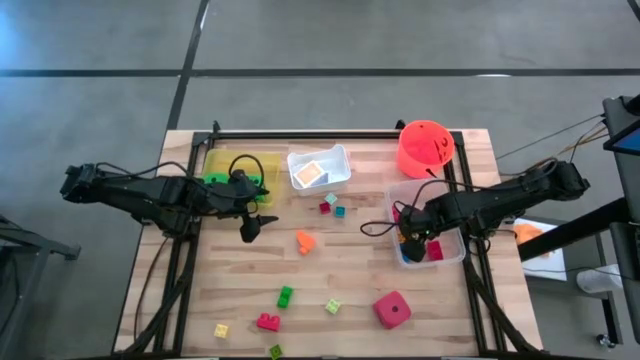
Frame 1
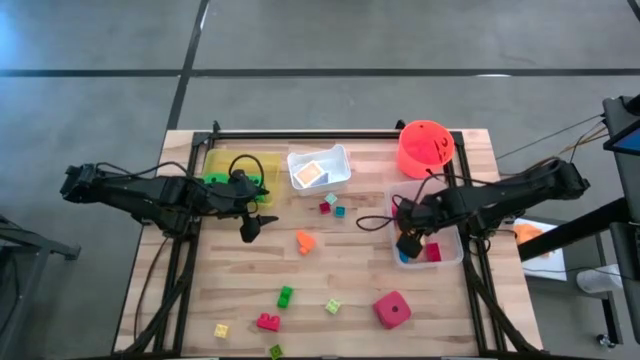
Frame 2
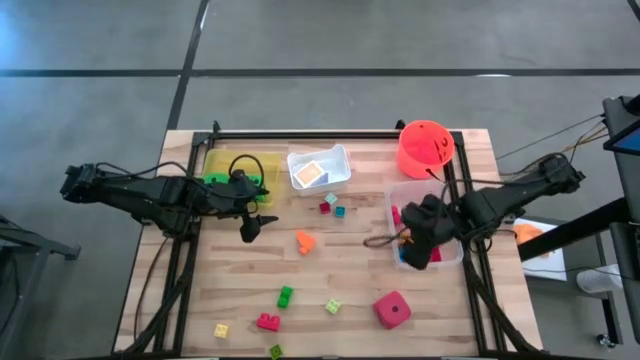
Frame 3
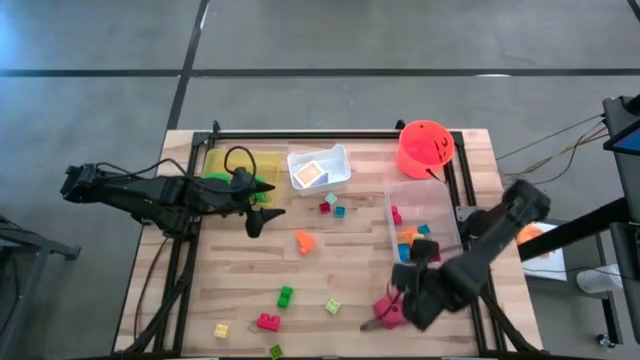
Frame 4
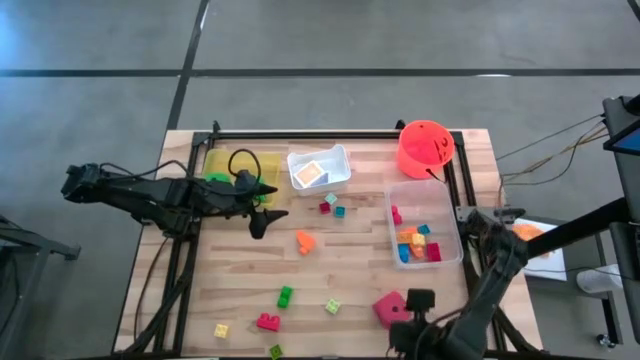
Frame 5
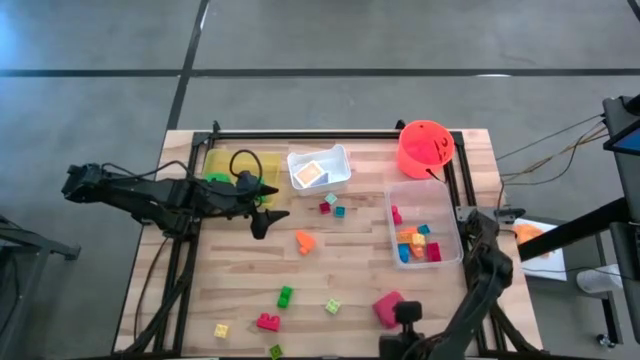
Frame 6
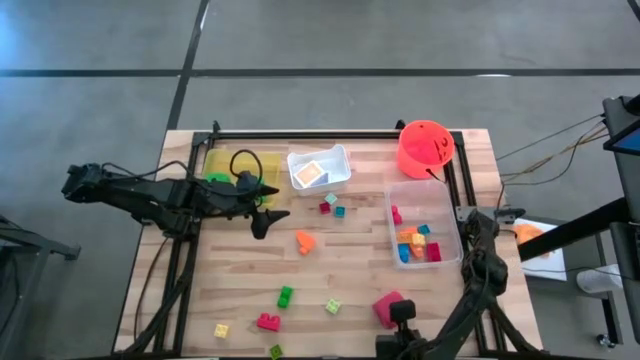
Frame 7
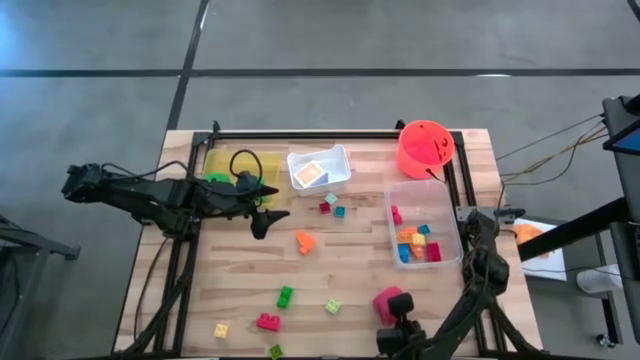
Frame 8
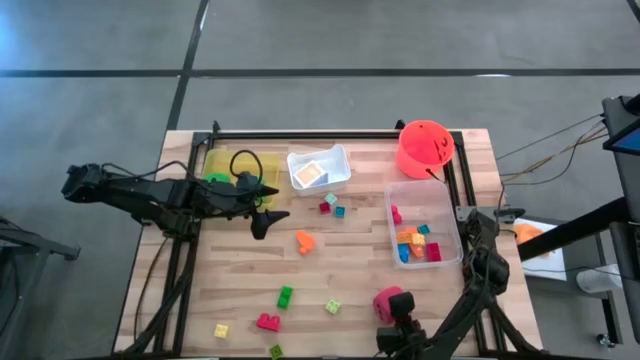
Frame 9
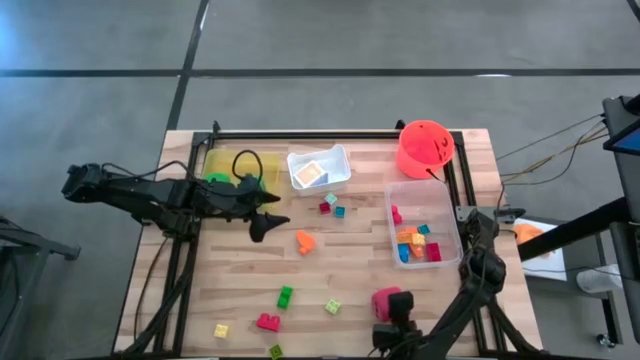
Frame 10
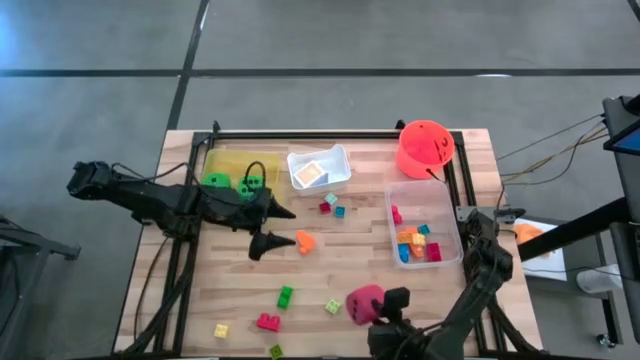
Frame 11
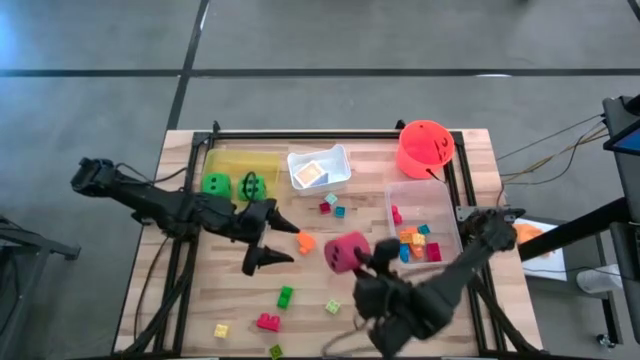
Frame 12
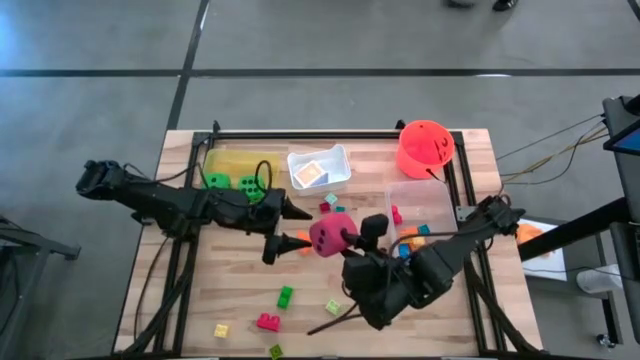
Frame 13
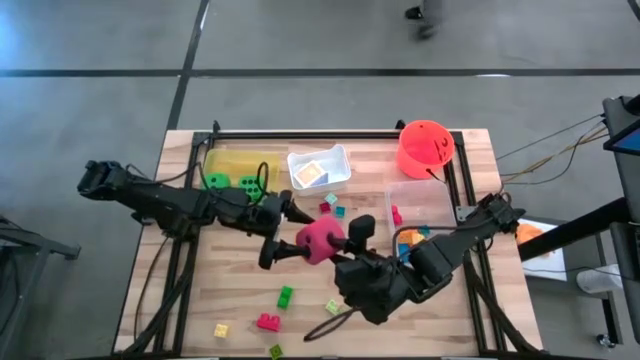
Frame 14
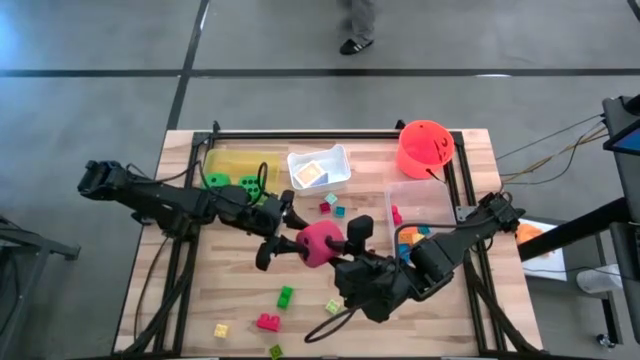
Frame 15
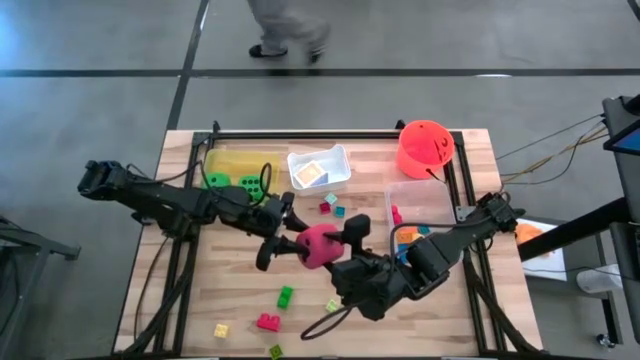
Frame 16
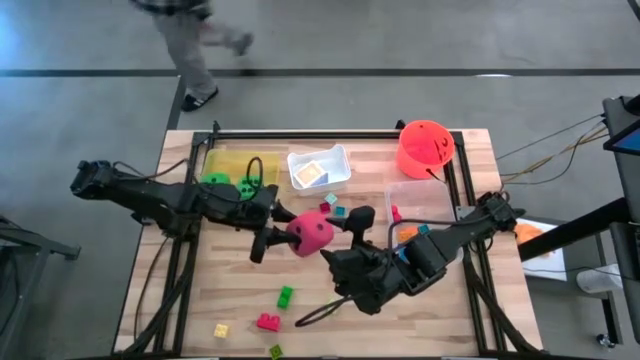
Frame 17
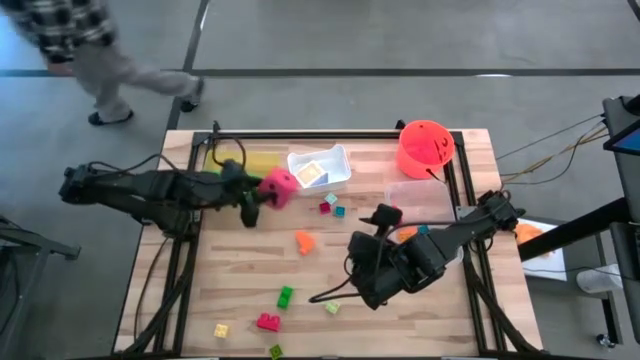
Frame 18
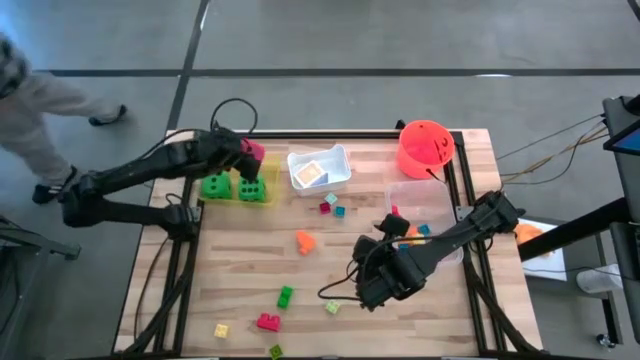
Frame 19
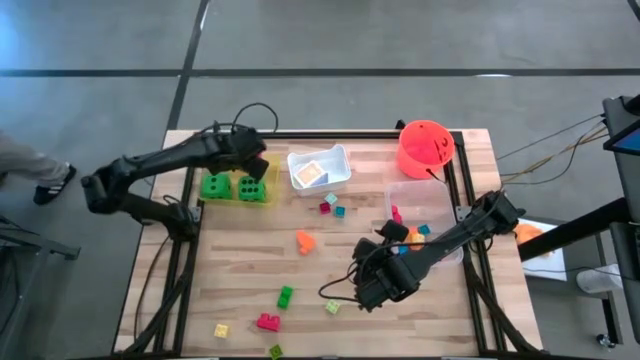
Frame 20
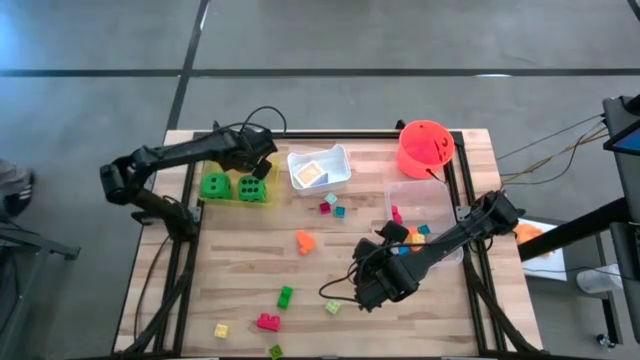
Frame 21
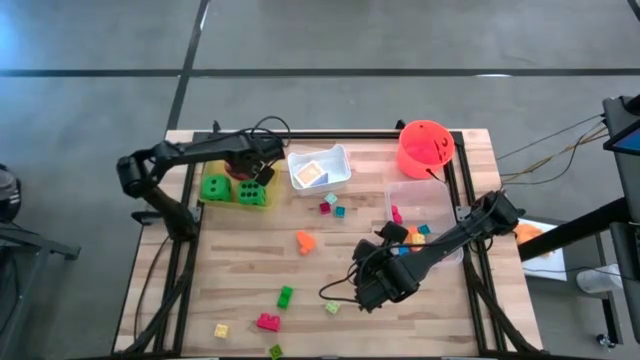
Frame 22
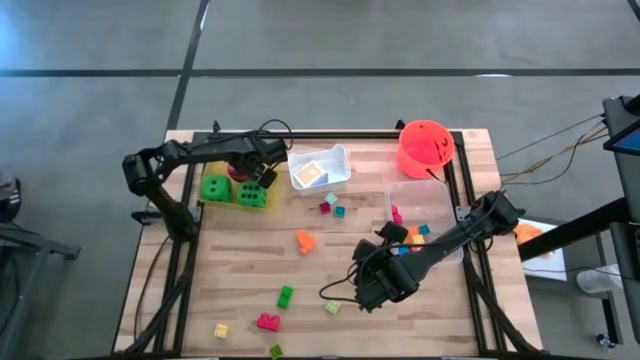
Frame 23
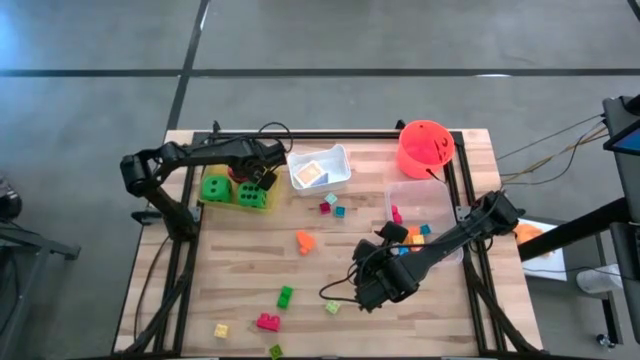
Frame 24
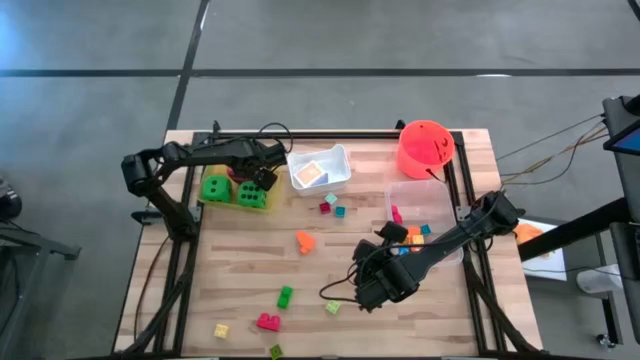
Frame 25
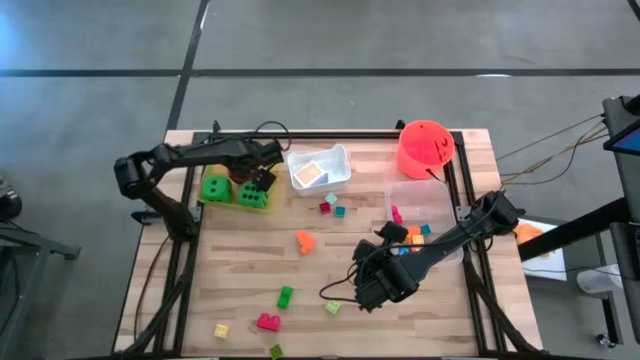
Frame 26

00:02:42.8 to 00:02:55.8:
Task: Pick & Place Toys
Put the red dice into the yellow bin

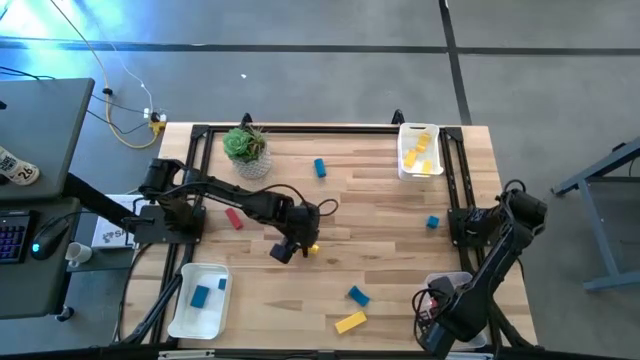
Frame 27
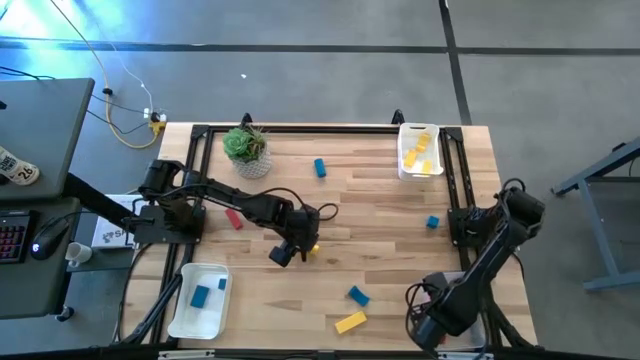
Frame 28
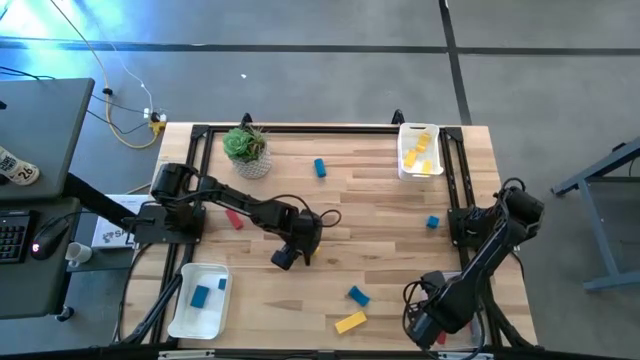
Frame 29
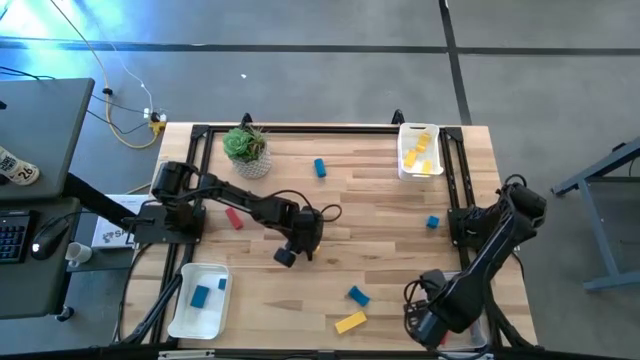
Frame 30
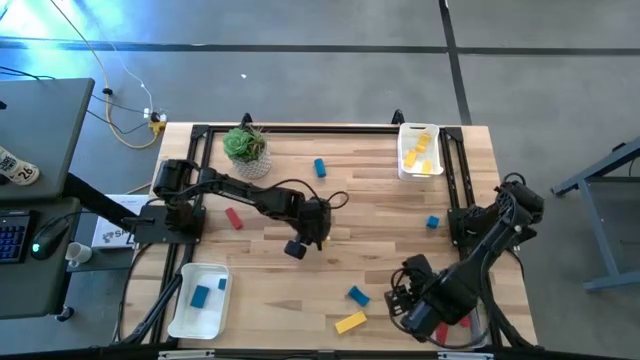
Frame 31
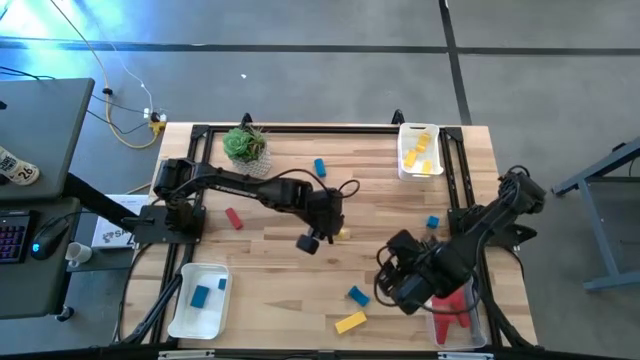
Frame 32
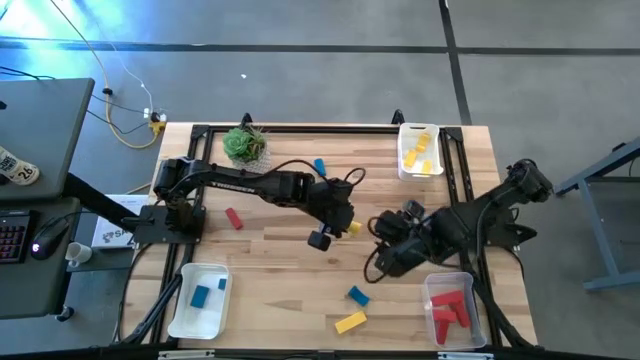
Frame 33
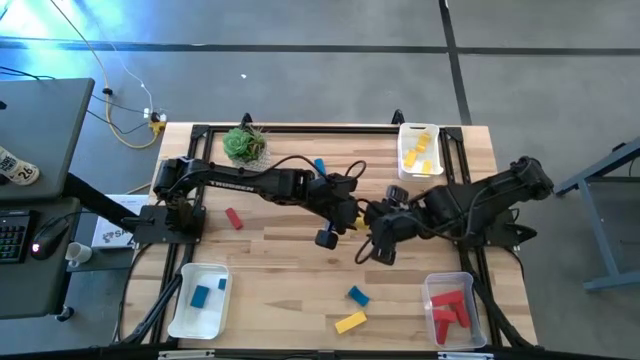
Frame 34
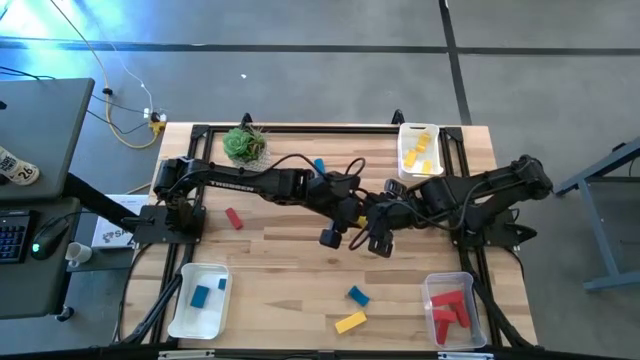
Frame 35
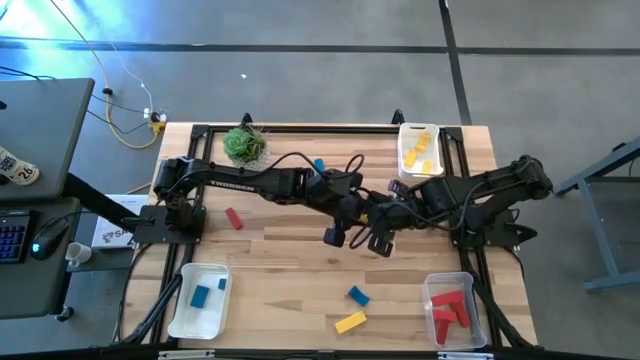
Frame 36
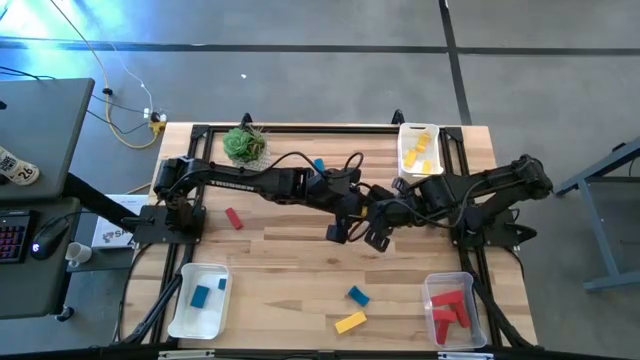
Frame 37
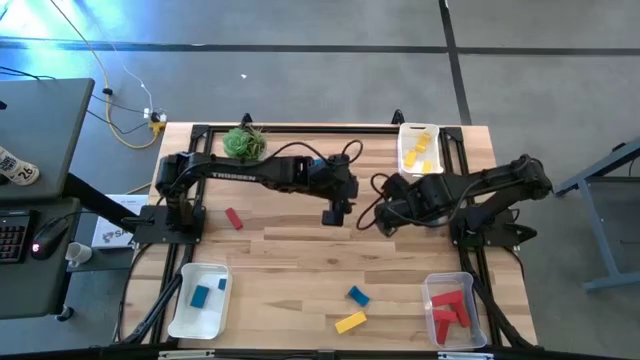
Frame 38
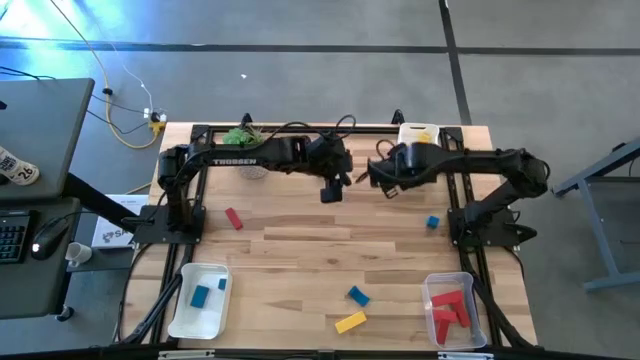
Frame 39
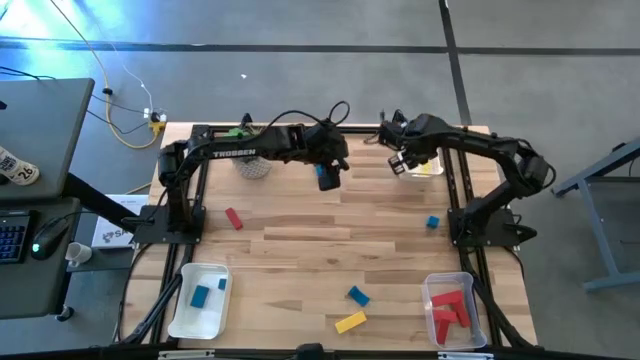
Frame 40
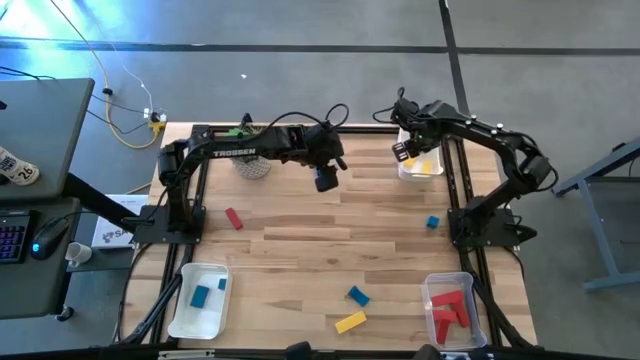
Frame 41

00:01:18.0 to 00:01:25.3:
Task: Sort & place blocks by color
Put the yellow block into the top white bin
